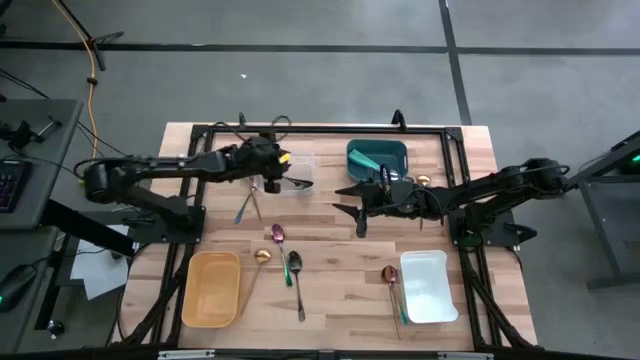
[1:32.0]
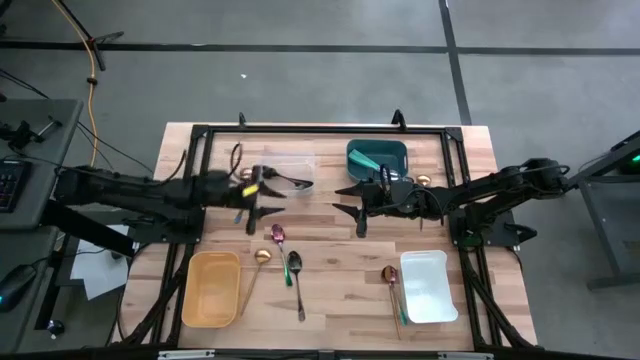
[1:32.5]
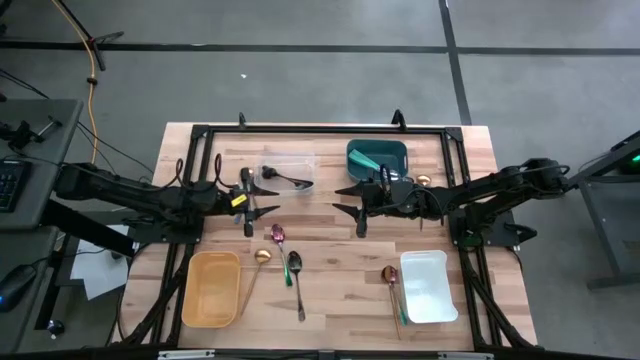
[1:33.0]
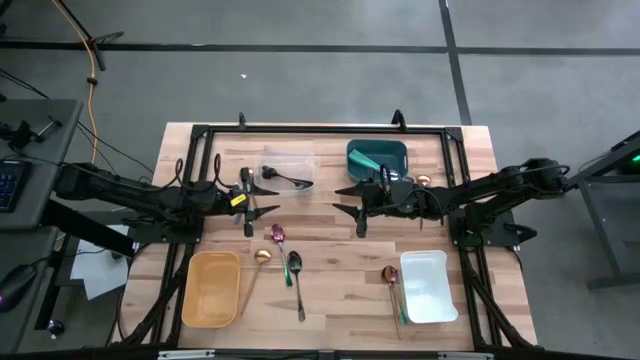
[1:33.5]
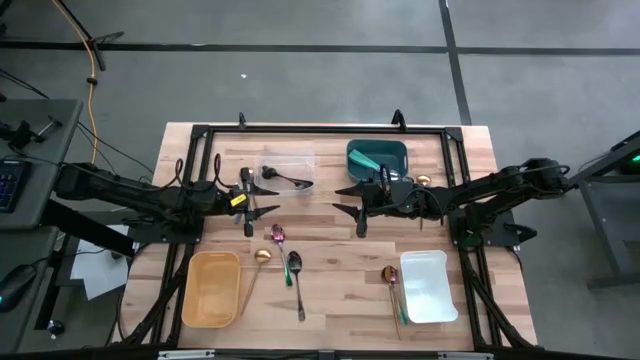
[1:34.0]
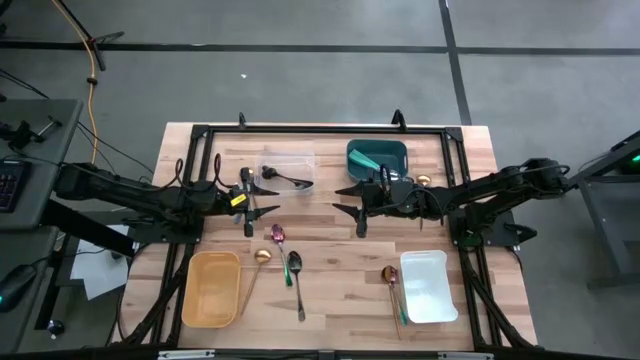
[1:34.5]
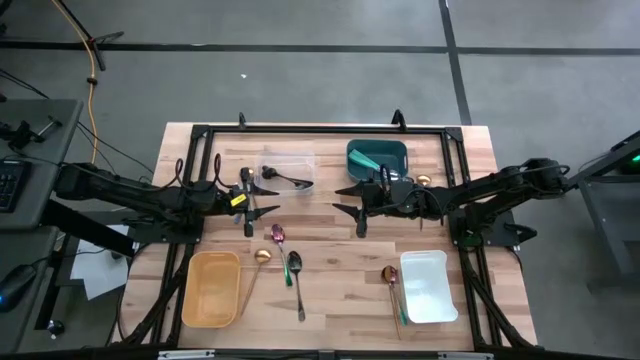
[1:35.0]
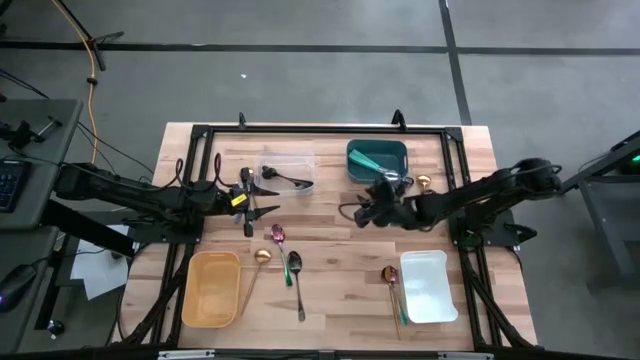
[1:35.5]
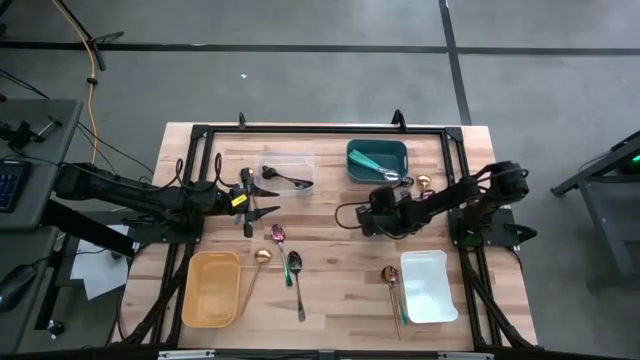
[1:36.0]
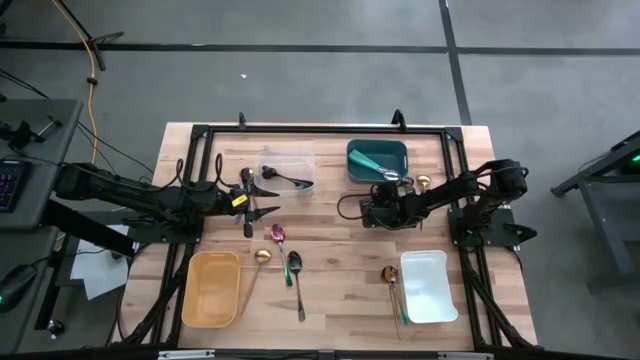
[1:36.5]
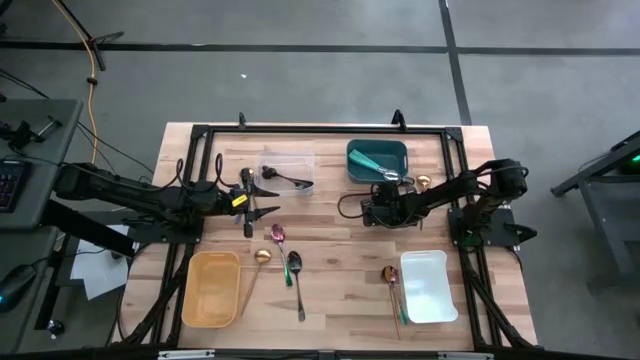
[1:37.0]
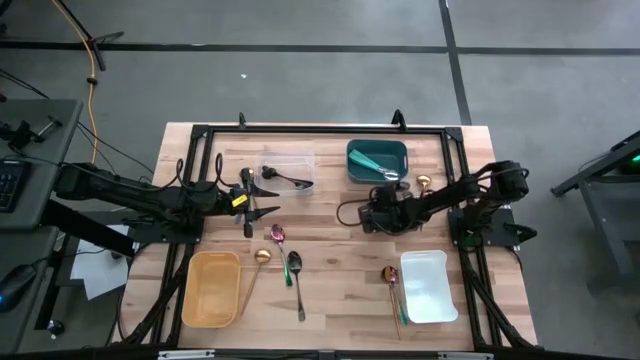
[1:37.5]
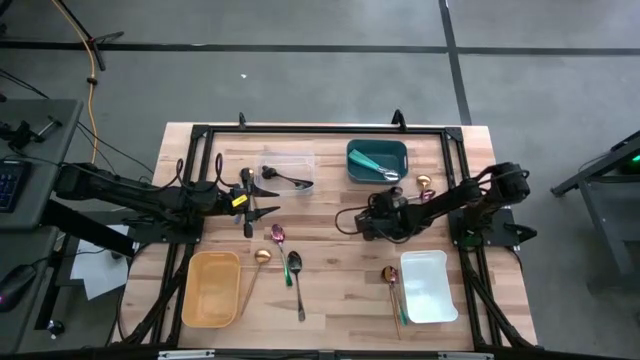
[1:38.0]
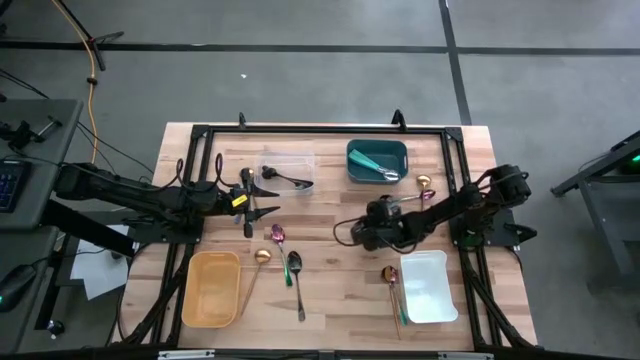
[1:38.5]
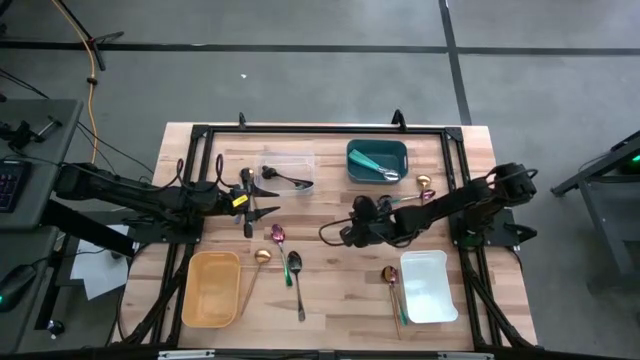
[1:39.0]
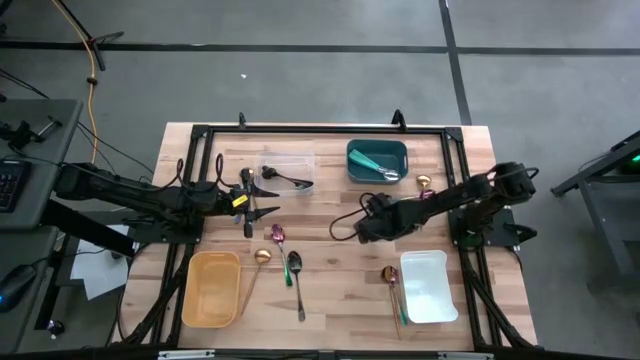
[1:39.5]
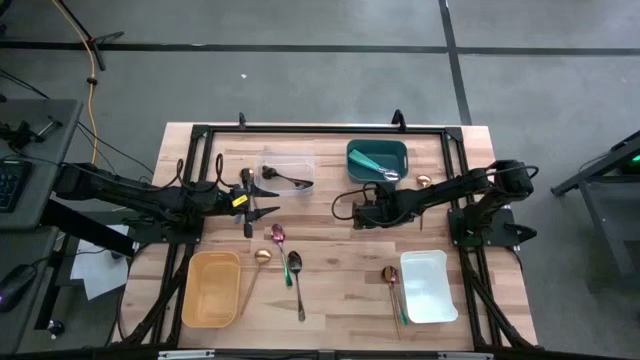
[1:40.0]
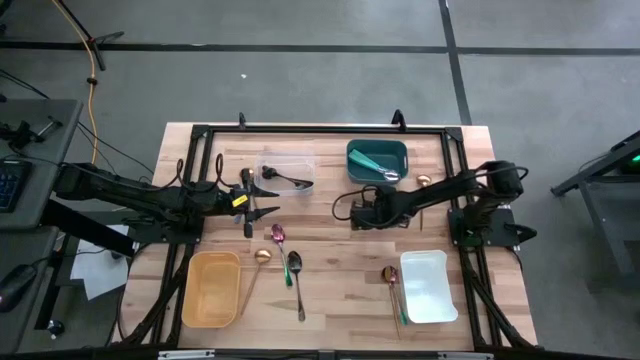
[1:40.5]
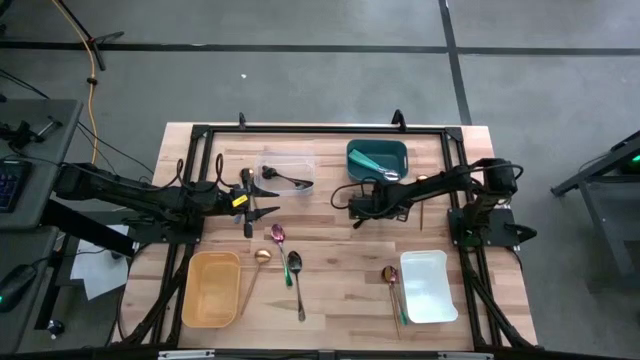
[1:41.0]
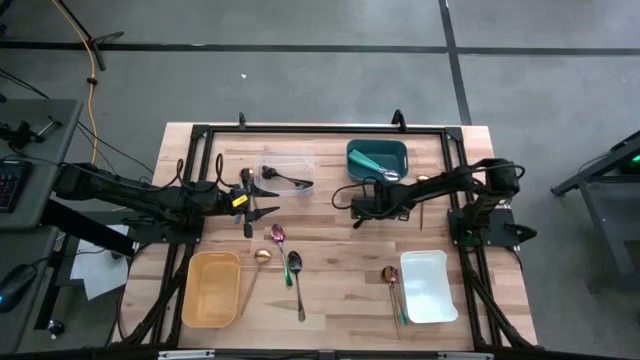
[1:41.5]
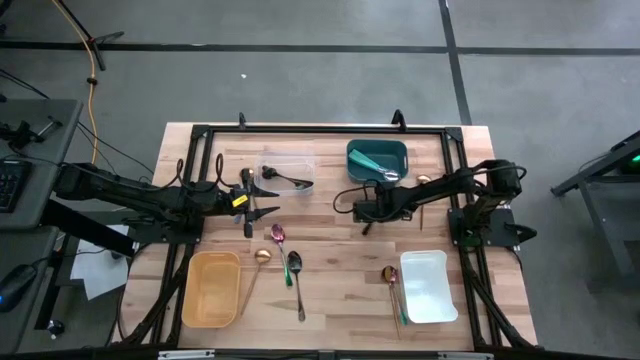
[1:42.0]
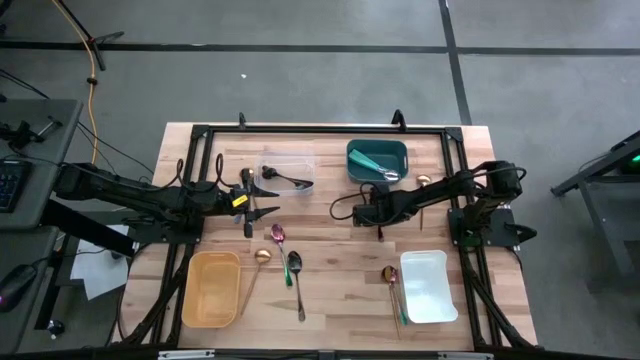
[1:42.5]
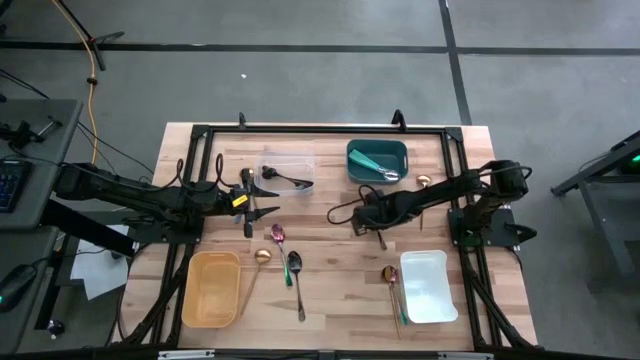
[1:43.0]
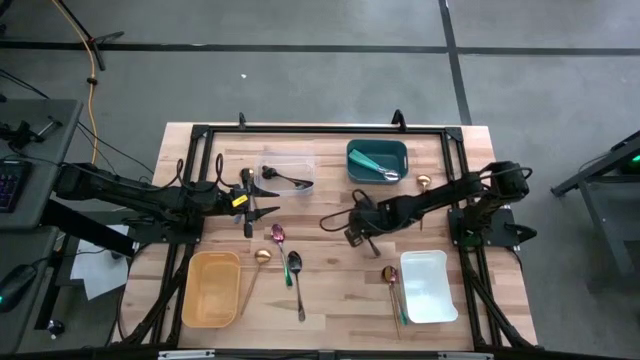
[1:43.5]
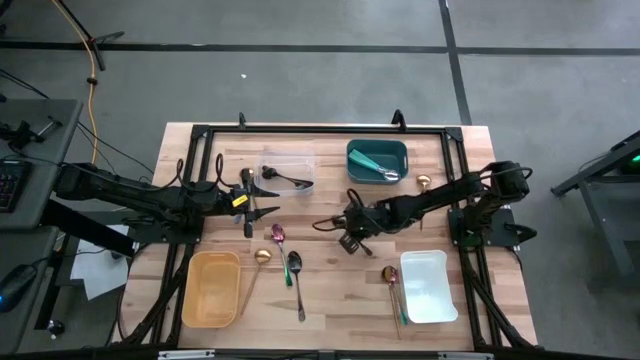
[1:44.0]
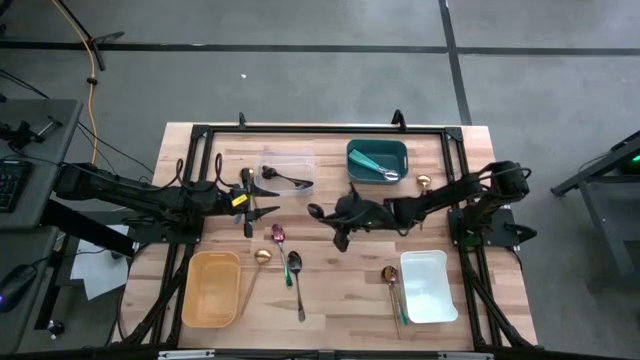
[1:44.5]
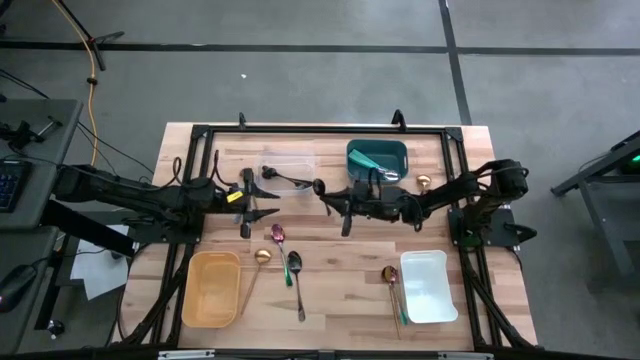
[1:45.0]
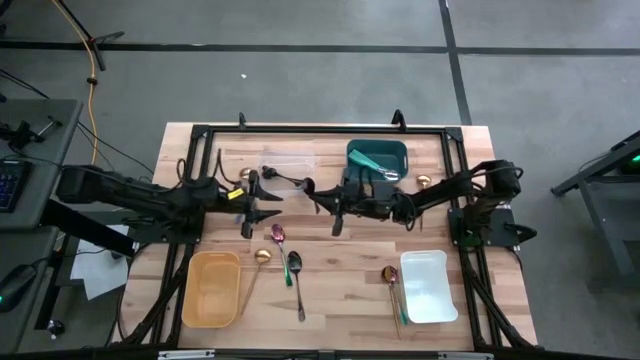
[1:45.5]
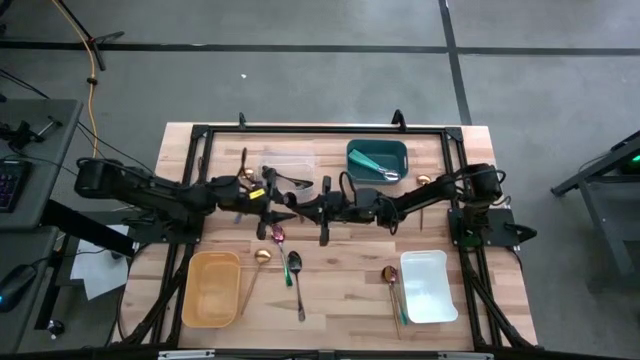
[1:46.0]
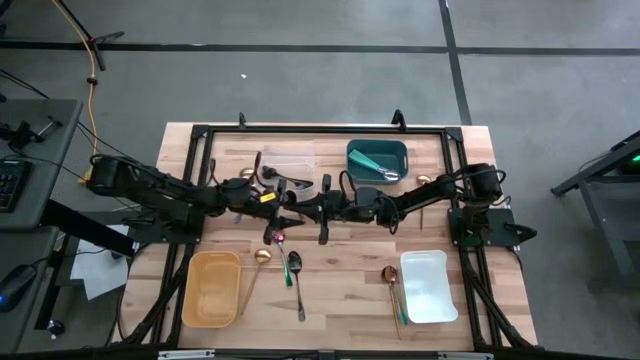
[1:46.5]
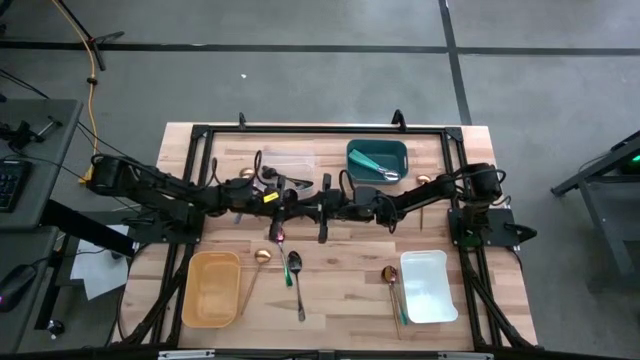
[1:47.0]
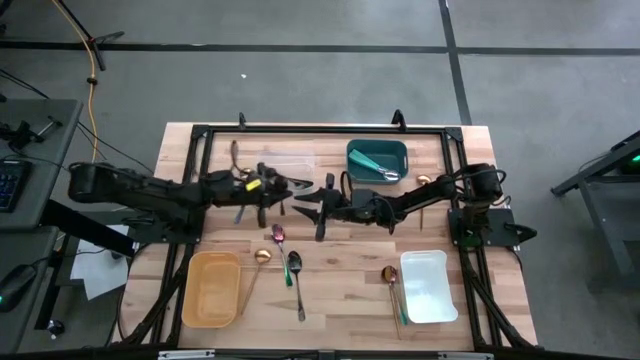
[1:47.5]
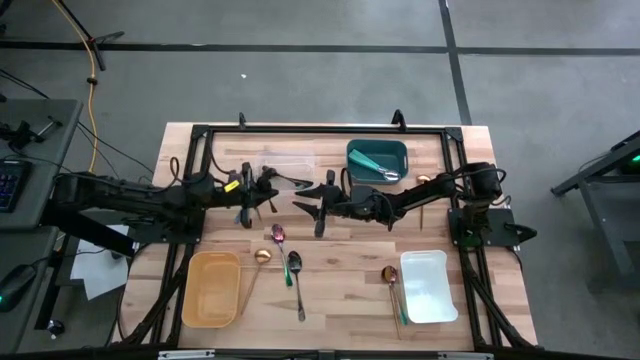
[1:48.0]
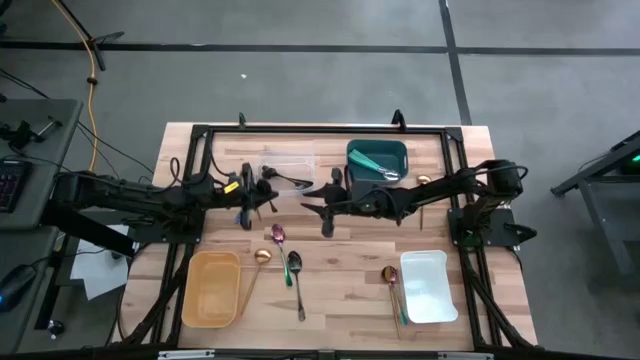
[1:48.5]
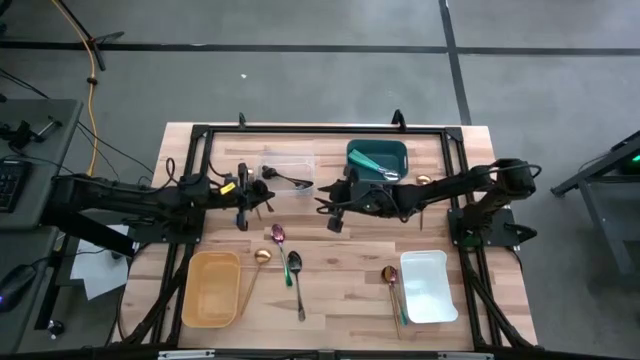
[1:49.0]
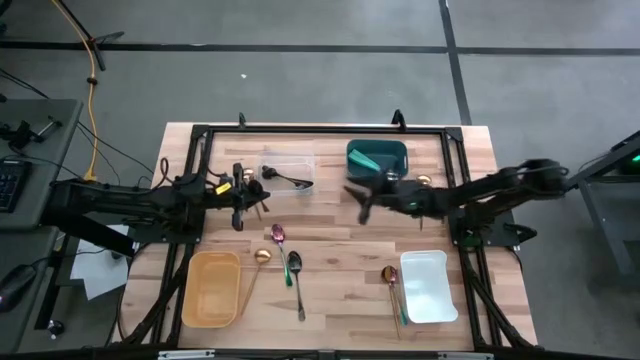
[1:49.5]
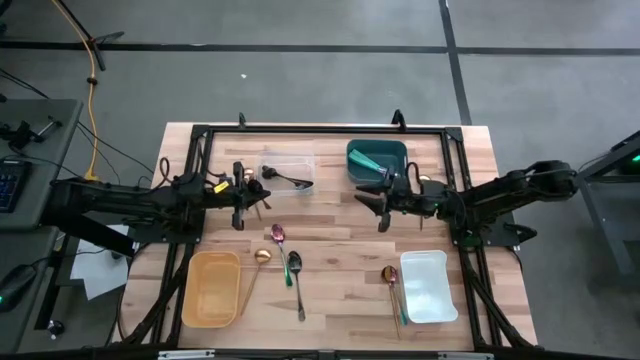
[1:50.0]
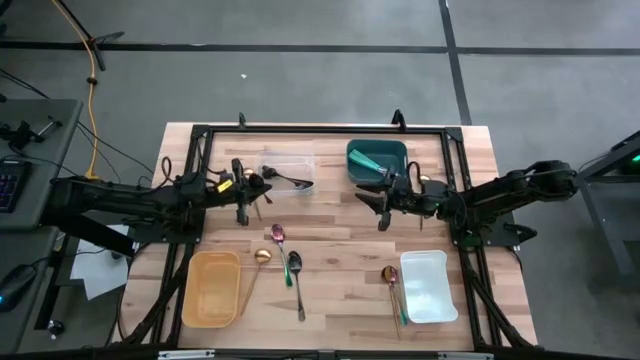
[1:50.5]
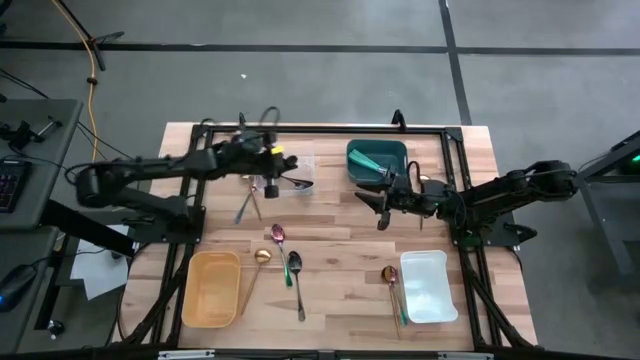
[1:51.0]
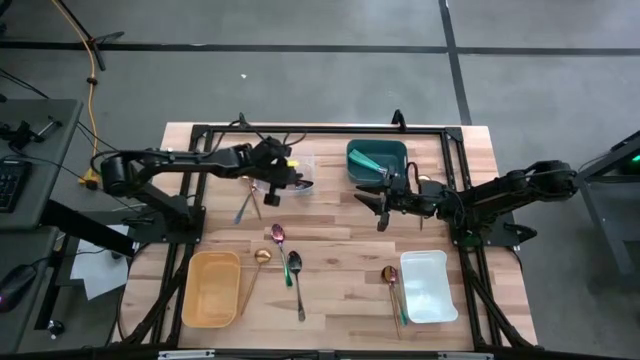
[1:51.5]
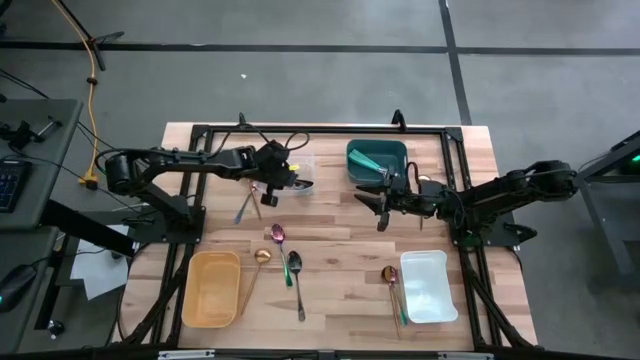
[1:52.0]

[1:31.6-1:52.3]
Task: Sort silverware by color (type)
Put the black spoon into the transparent bin
